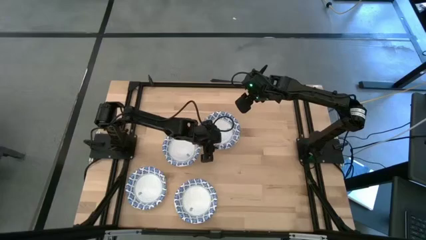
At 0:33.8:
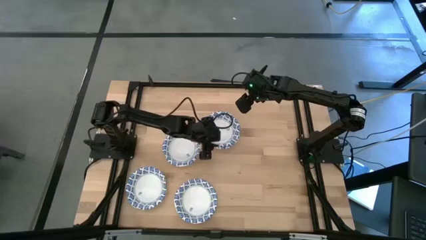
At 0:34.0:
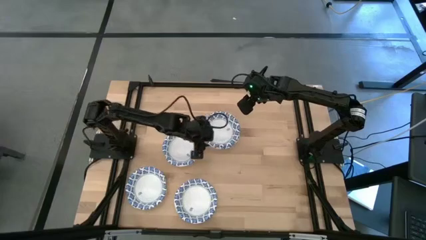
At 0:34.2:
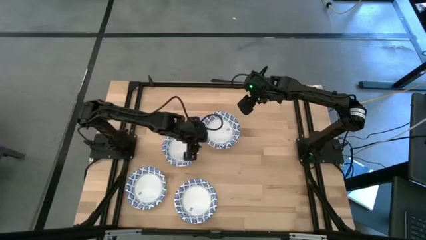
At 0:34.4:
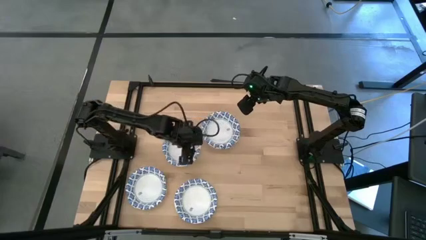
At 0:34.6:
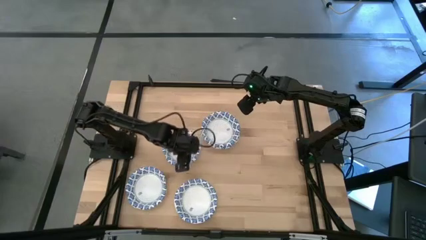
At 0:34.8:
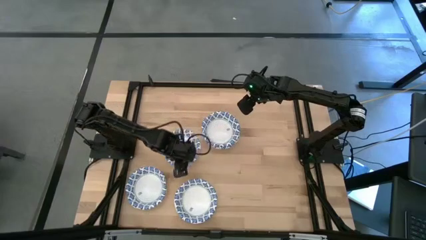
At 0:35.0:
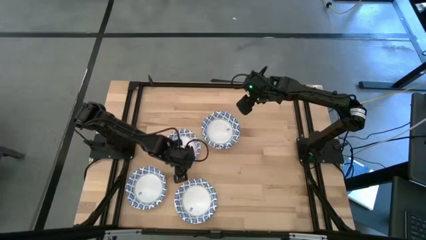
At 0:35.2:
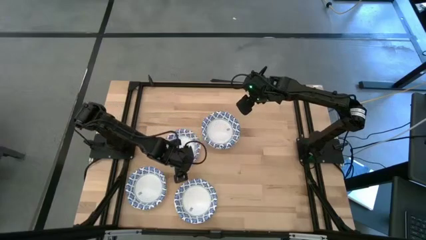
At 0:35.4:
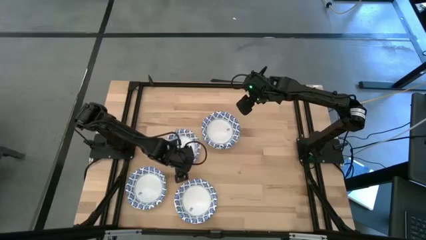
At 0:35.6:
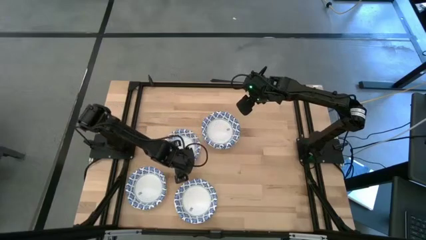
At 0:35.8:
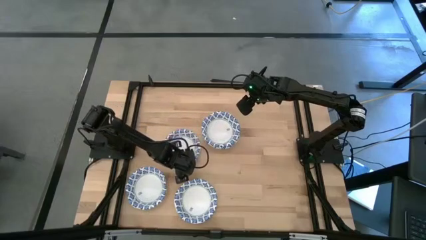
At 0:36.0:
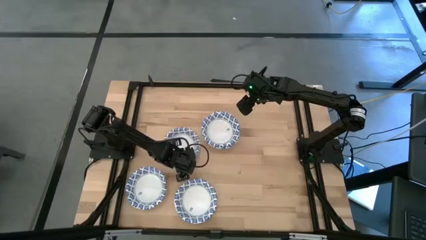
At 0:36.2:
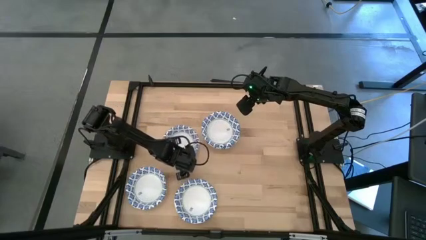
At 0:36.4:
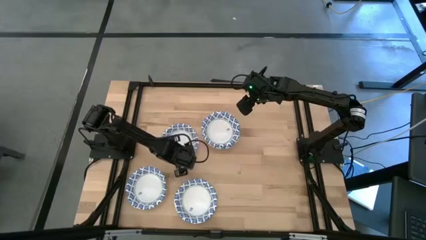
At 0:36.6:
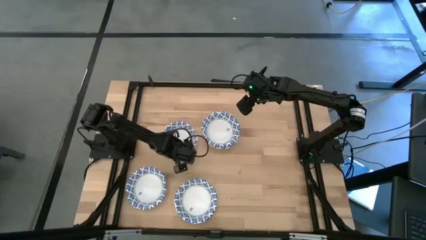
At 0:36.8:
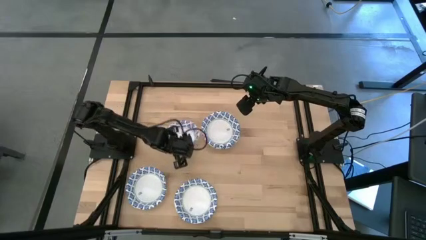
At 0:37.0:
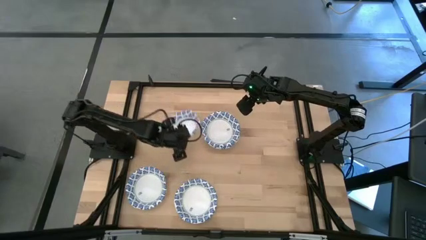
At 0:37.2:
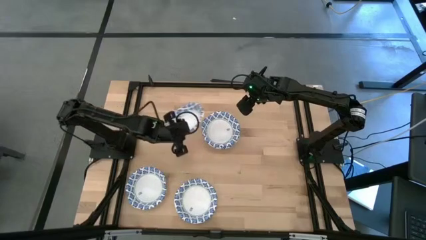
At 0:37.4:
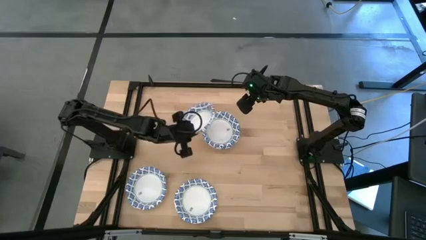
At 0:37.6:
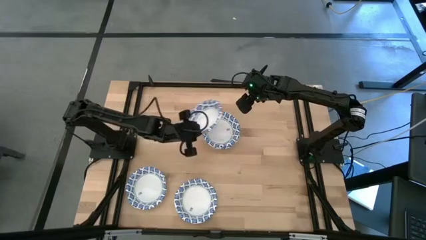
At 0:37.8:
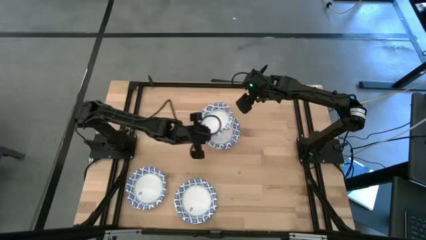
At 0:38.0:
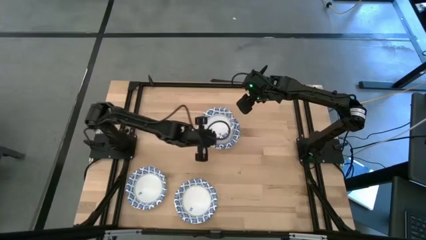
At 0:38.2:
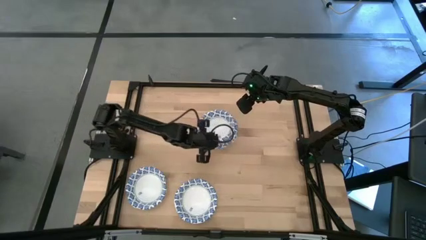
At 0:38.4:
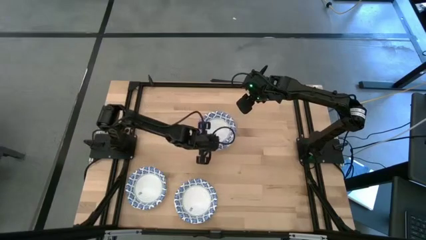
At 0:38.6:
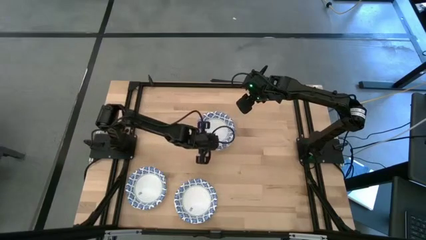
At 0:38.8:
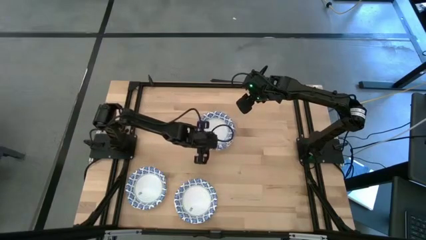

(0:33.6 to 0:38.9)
Task: Nest bowls inside each other
Stack the blue patterned bowl on top of the other blue patterned bowl

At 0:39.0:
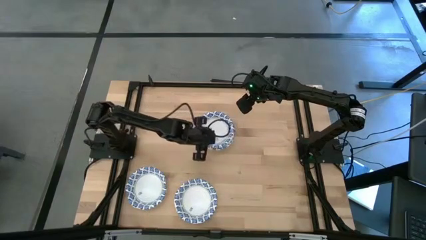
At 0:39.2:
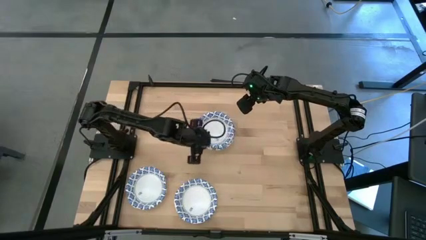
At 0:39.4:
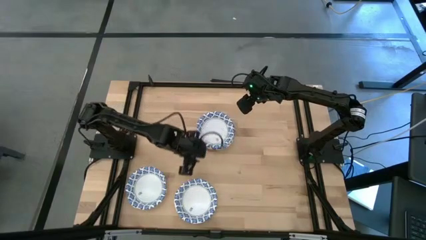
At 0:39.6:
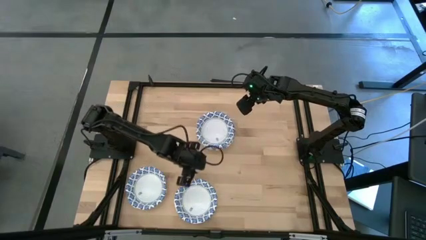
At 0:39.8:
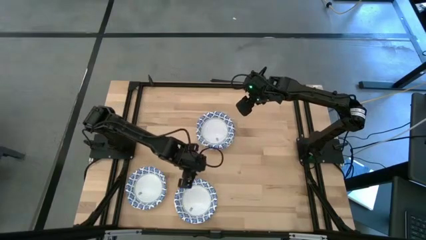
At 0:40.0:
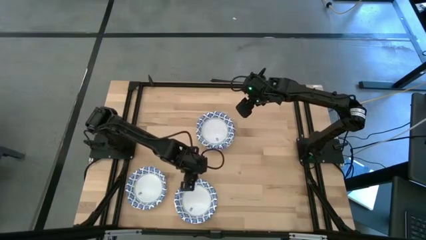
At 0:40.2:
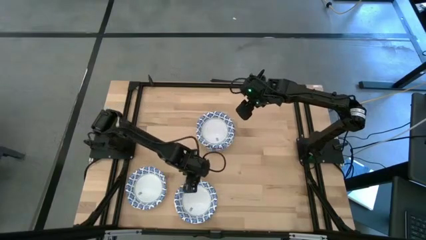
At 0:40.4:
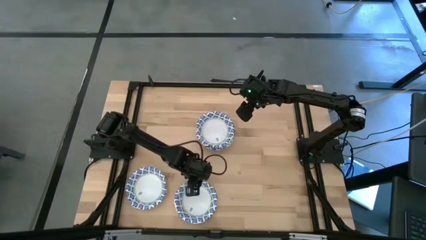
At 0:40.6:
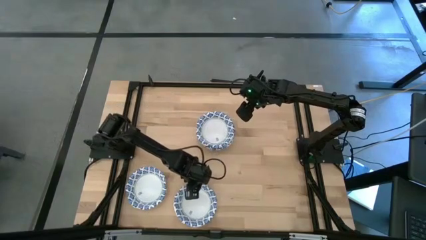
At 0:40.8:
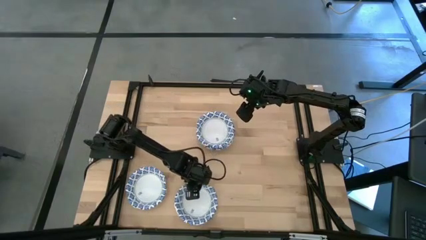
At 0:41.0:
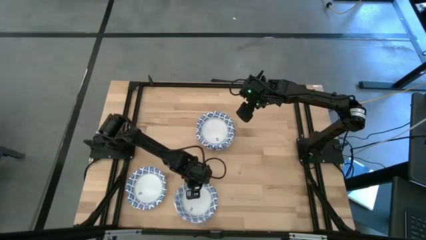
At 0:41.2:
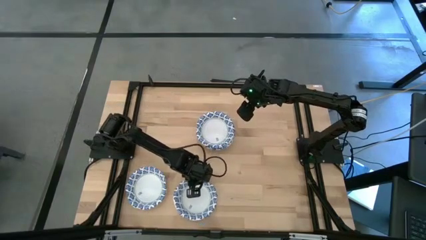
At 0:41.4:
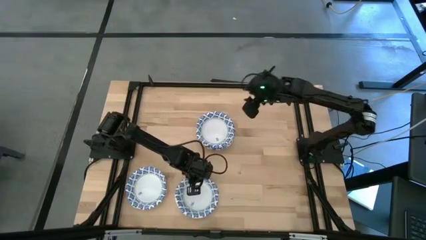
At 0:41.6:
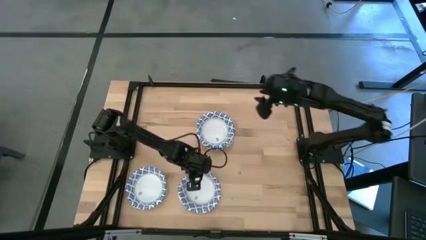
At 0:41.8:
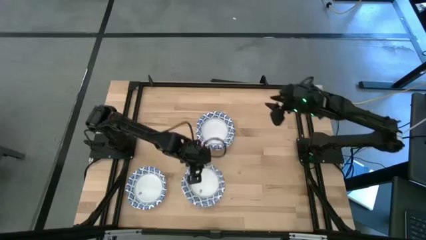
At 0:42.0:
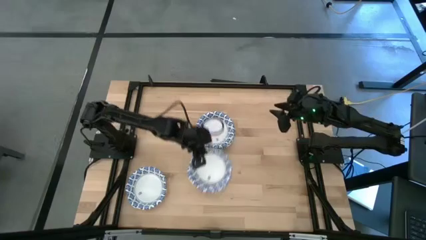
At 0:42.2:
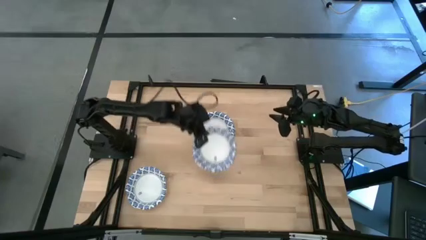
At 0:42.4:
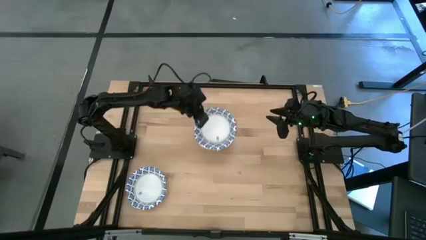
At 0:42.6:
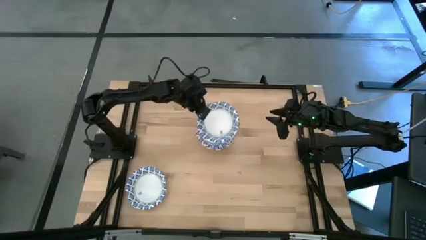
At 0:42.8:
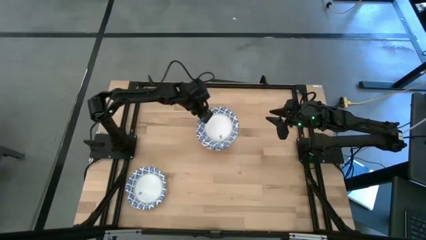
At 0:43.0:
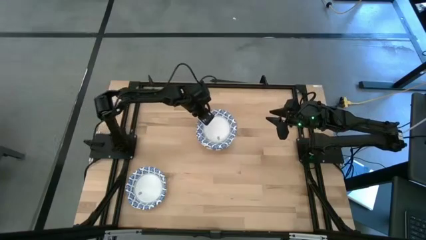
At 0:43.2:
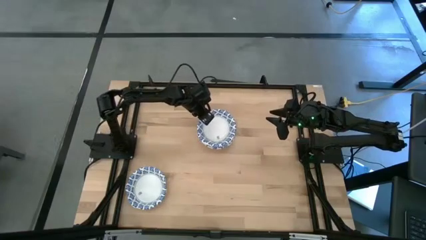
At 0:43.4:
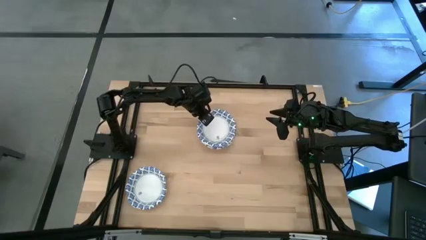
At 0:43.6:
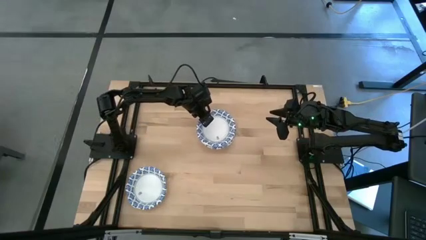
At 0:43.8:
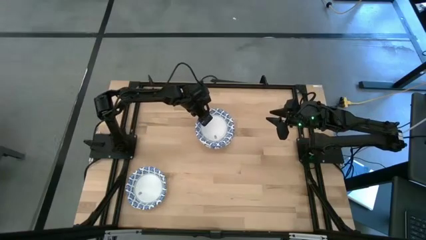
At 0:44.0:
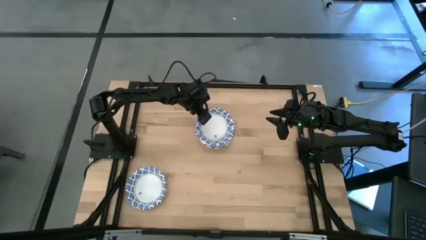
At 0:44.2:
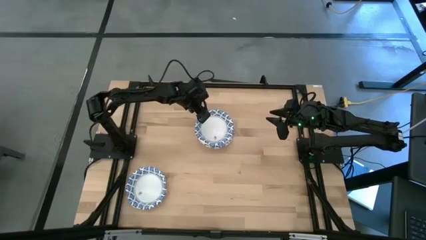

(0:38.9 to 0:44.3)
Stack the blue patterned bowl on top of the other blue patterned bowl

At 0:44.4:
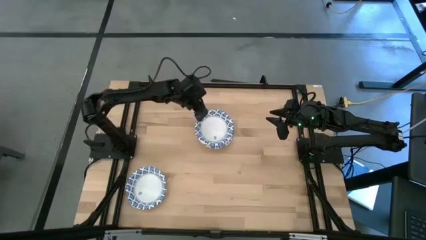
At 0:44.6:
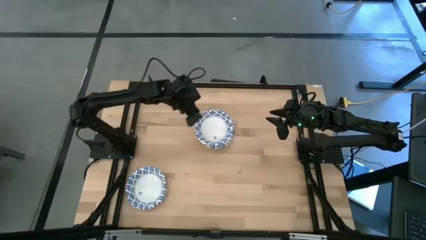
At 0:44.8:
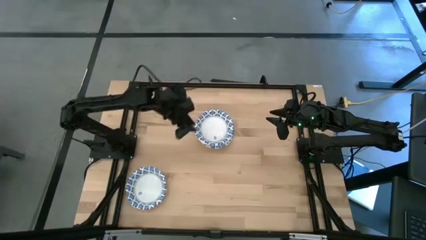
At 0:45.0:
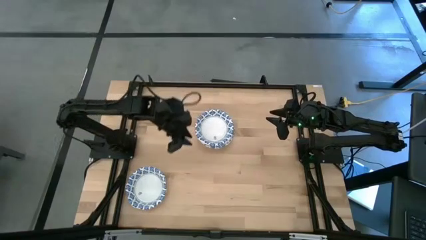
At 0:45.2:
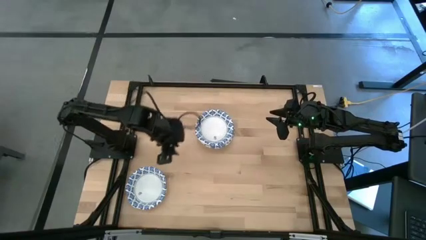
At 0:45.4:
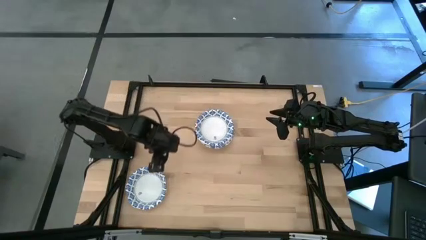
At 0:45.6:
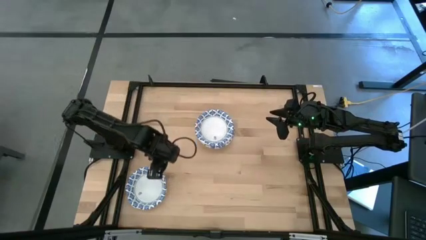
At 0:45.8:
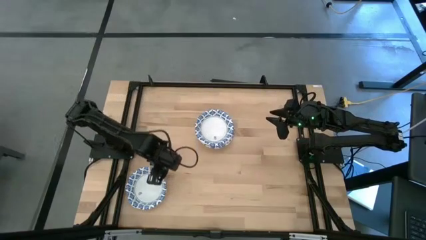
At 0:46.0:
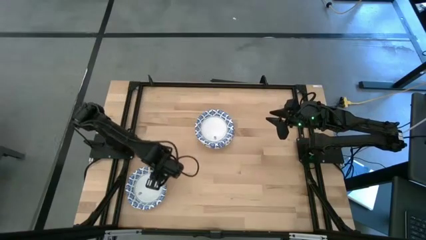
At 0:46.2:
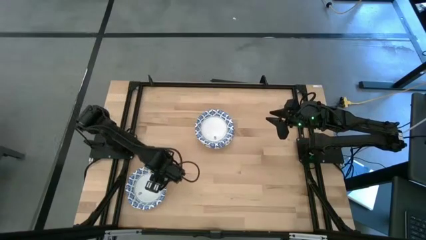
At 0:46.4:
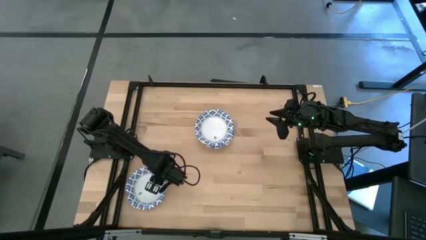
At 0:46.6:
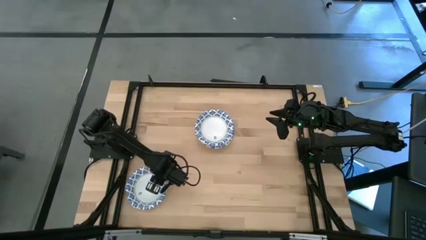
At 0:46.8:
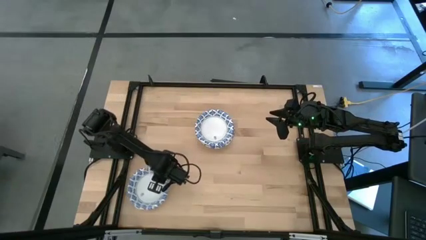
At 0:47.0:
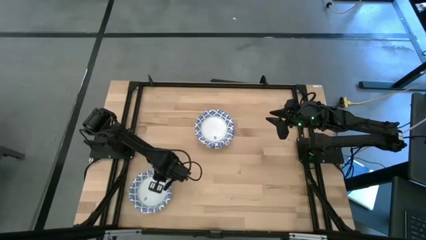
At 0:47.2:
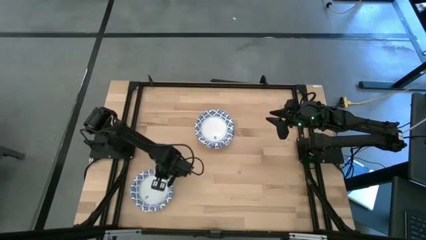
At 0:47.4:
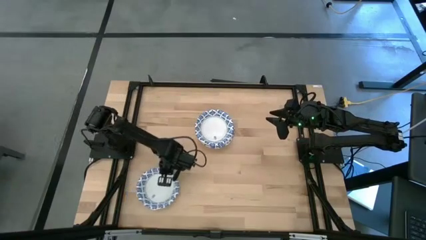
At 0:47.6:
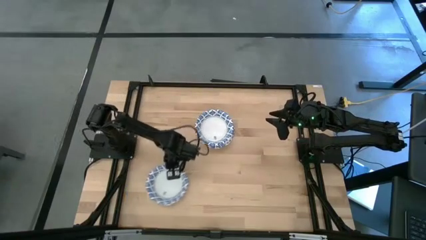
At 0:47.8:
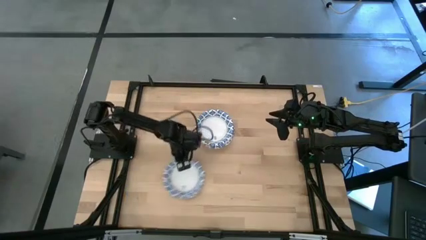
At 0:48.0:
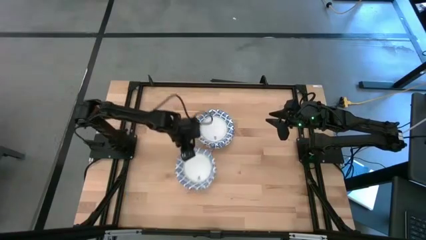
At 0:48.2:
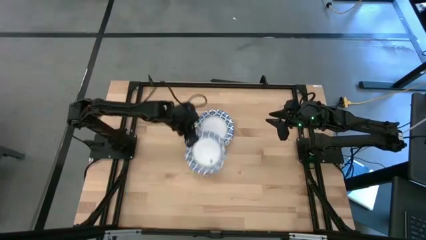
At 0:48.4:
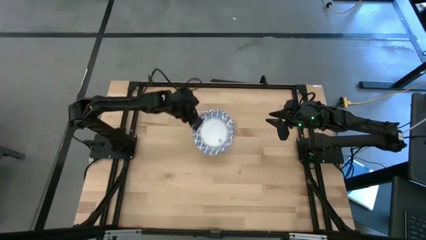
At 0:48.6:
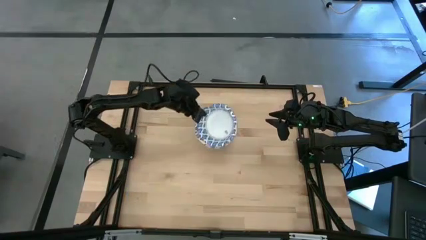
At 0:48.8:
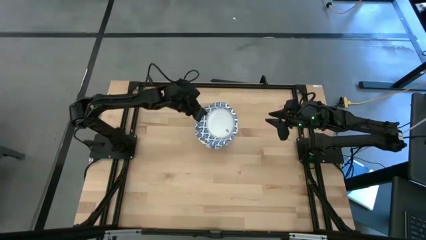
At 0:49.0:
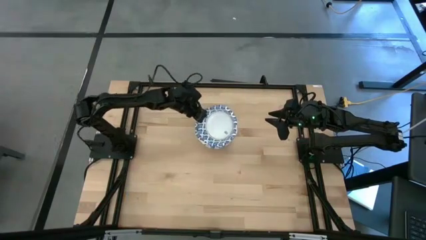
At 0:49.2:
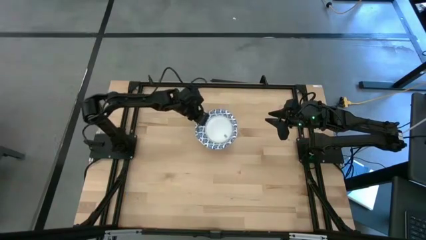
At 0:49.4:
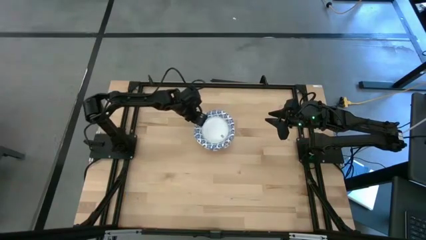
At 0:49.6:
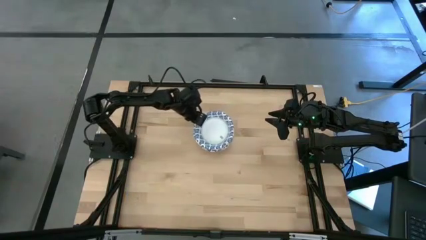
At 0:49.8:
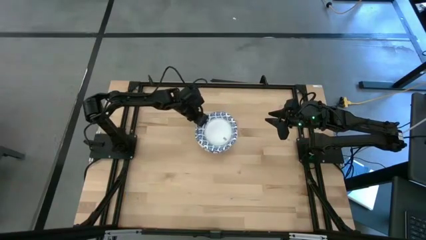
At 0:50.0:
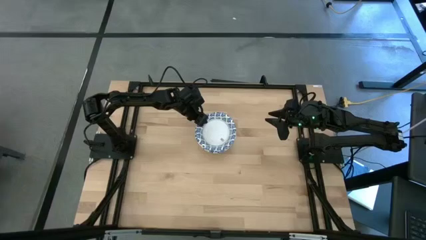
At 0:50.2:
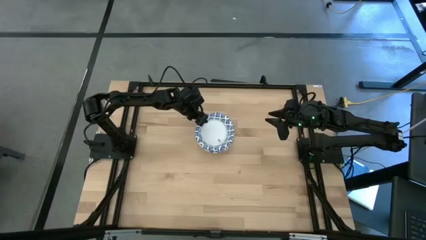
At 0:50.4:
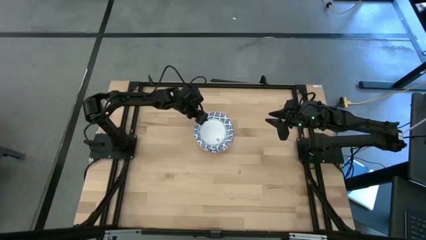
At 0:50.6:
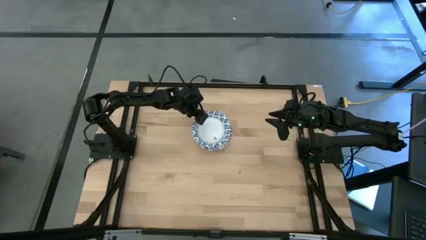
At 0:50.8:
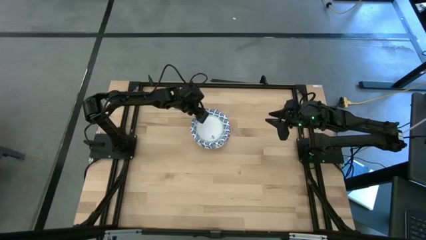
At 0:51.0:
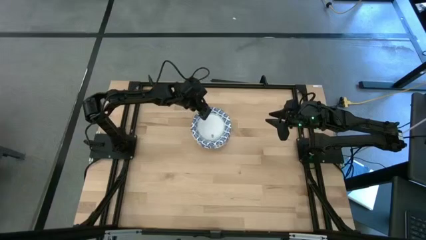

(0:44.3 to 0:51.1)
Stack the blue patterned bowl on top of the other blue patterned bowl
